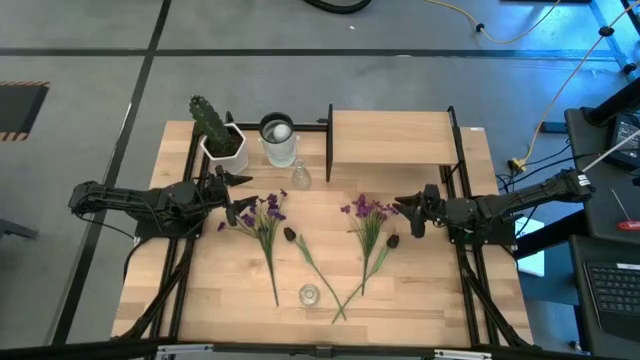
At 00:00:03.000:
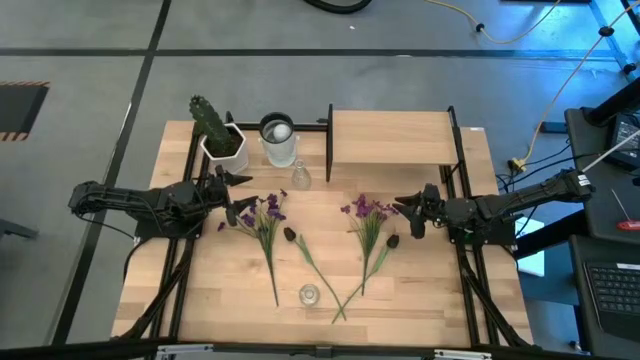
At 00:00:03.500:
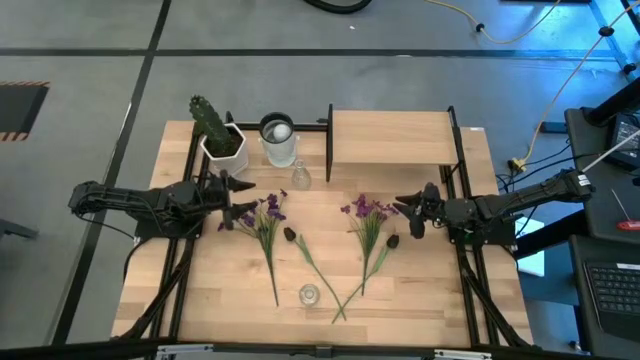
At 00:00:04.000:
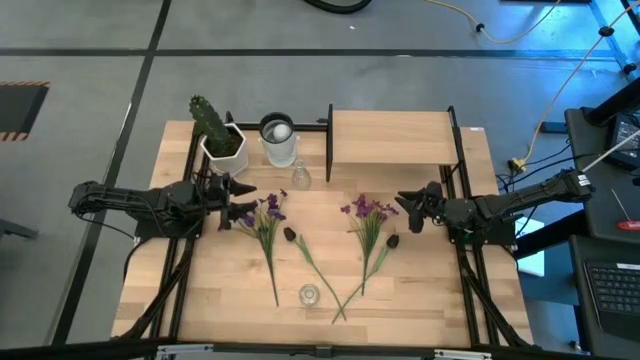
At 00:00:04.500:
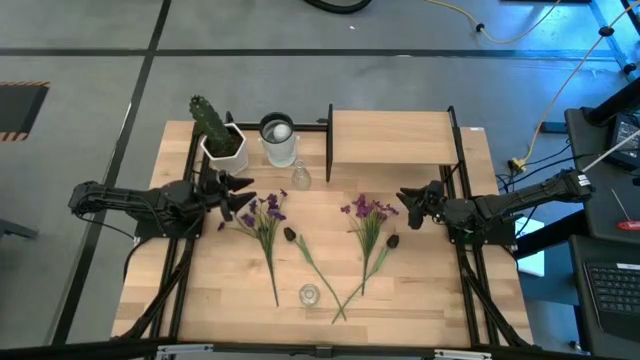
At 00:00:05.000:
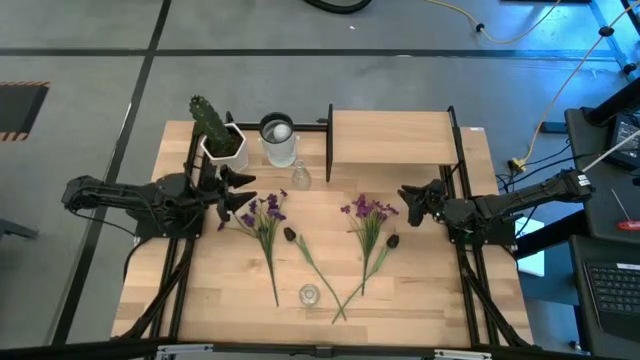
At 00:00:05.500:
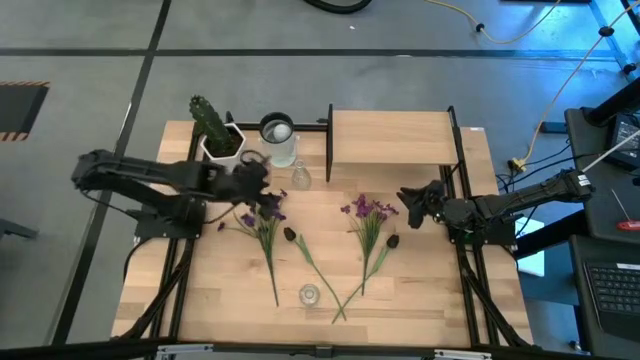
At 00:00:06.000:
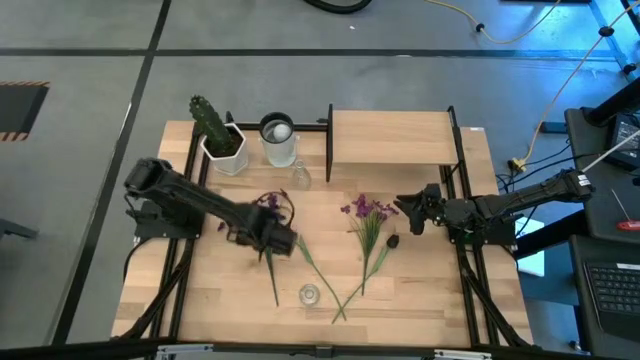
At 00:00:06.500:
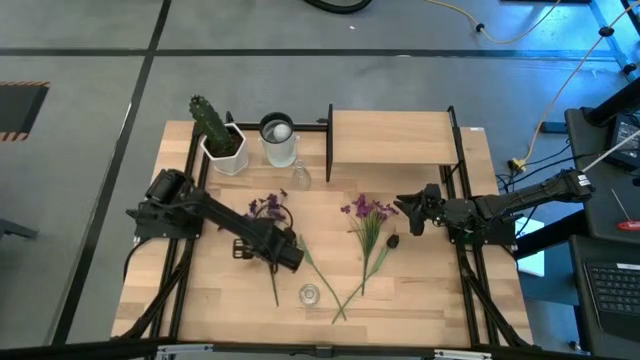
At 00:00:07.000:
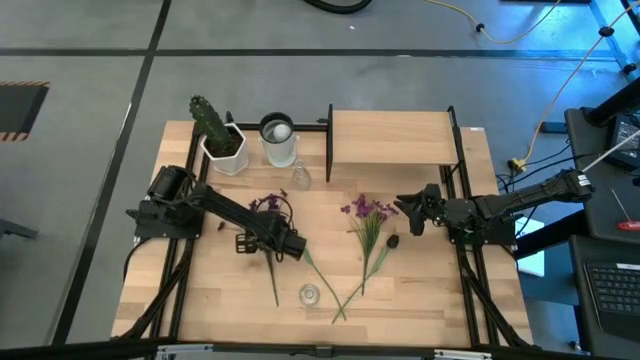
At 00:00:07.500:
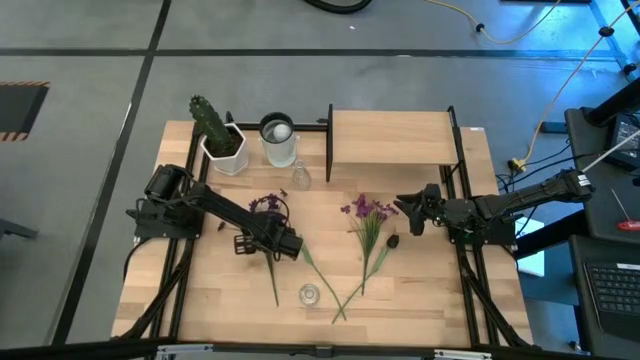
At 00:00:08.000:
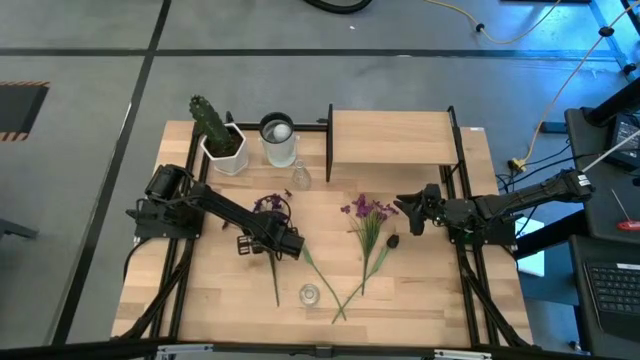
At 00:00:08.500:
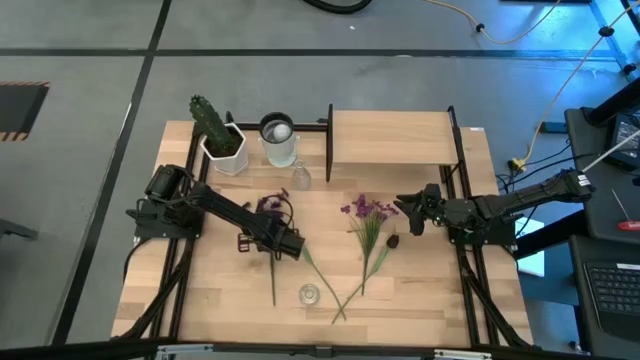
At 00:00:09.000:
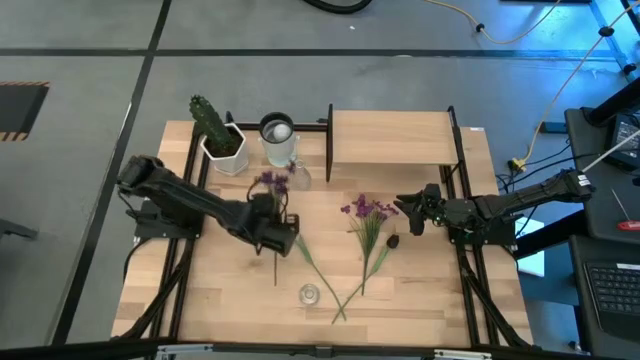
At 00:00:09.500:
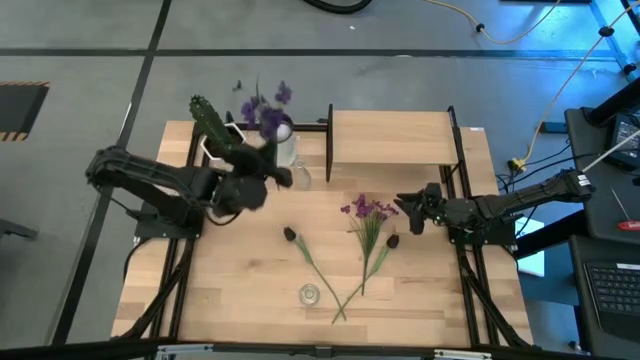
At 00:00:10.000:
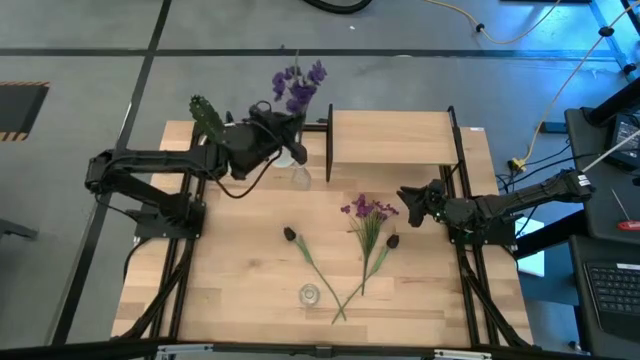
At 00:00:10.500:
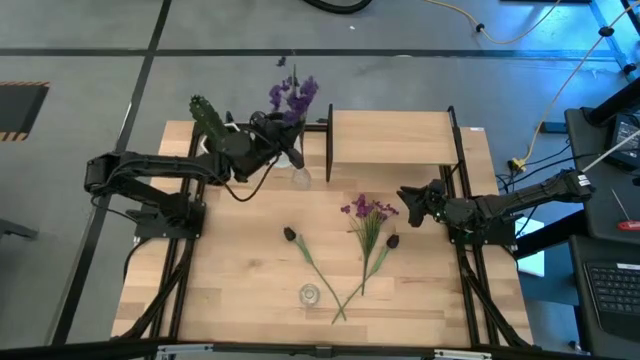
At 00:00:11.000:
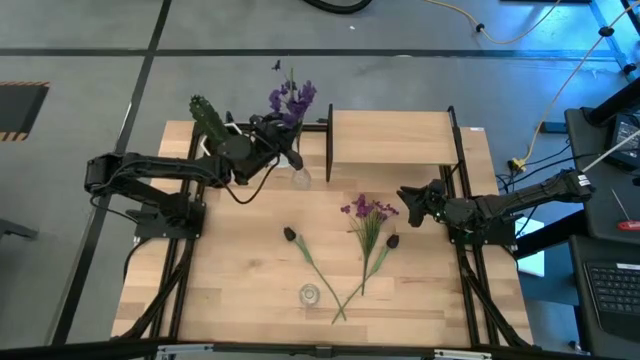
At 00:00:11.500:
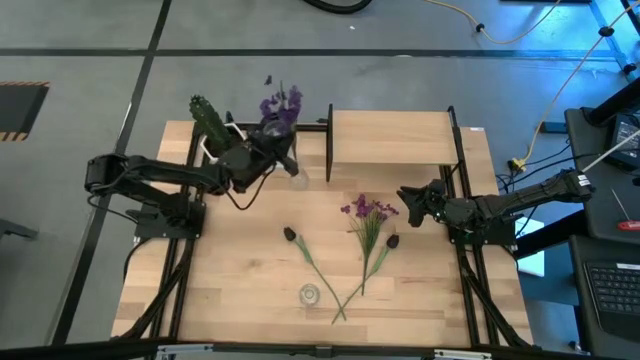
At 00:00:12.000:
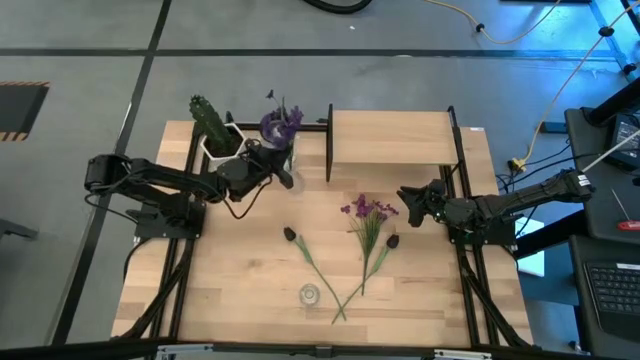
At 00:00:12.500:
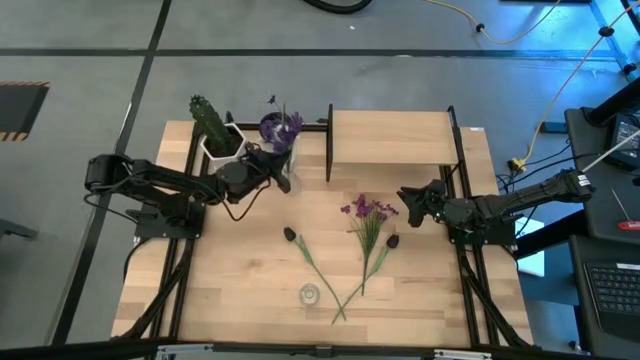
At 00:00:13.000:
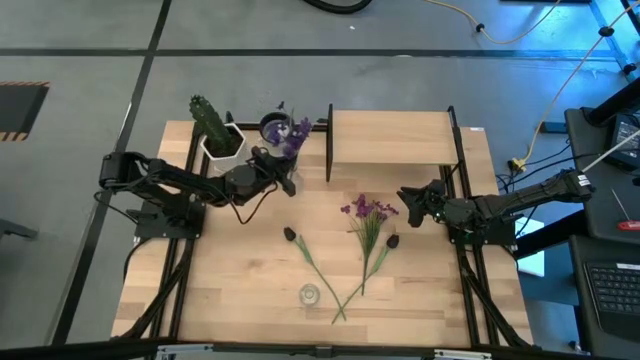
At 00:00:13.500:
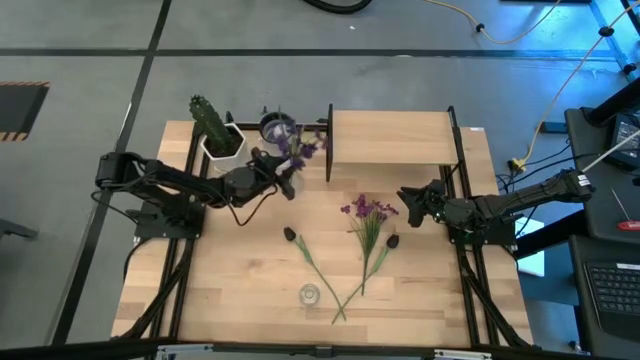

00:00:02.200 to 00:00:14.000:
Task: Pick and place flowers into a vace then onto a shelf
Put the dark purple flowers into the top transparent vase

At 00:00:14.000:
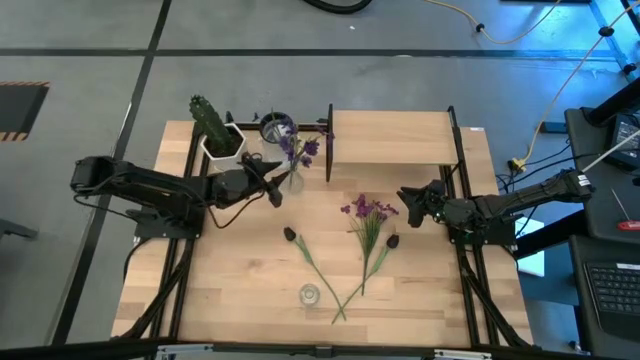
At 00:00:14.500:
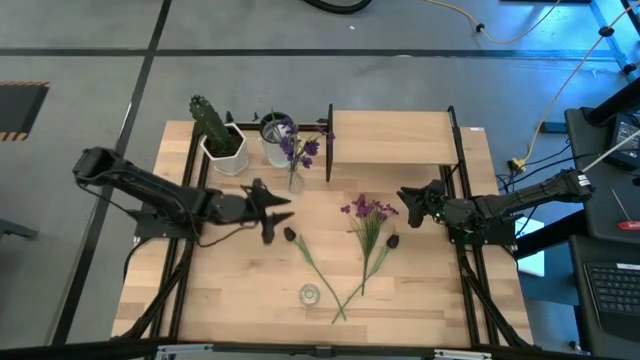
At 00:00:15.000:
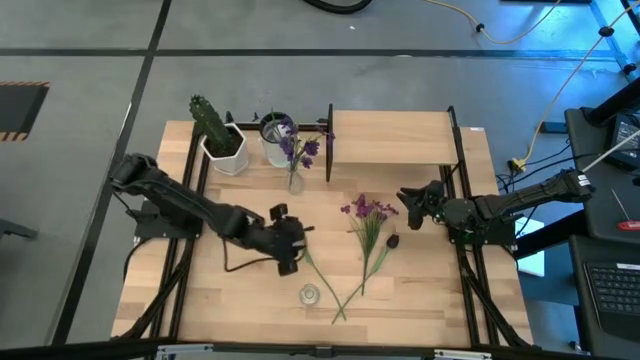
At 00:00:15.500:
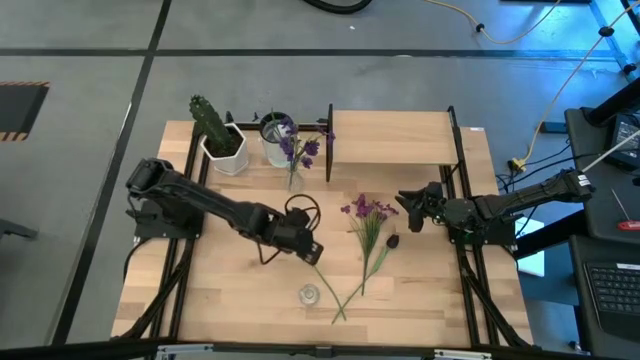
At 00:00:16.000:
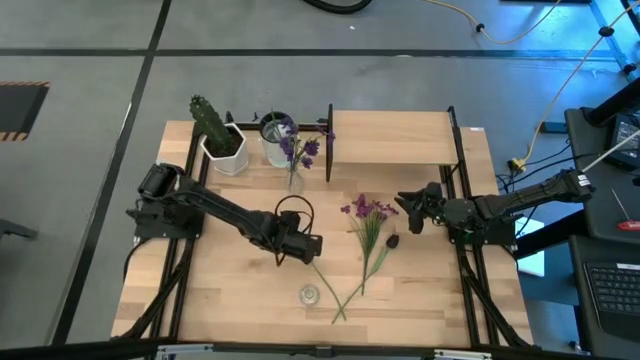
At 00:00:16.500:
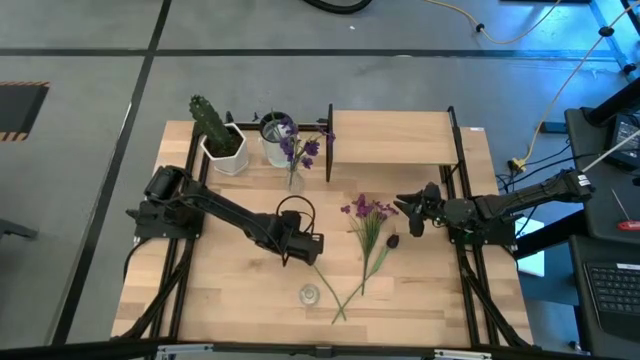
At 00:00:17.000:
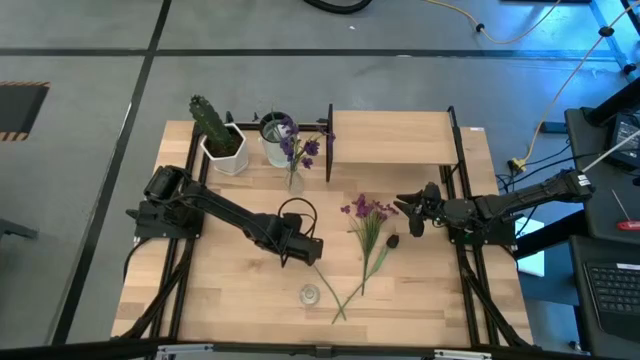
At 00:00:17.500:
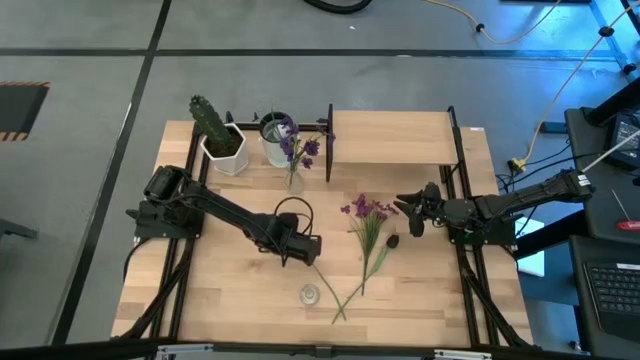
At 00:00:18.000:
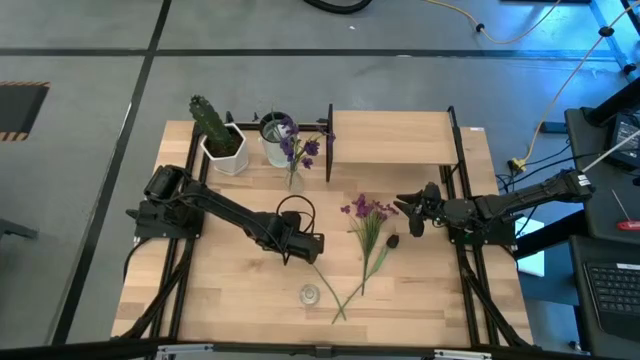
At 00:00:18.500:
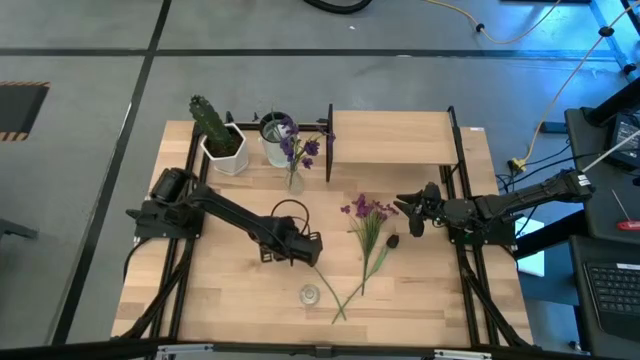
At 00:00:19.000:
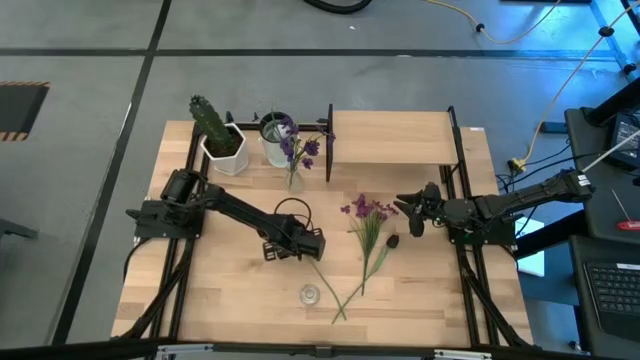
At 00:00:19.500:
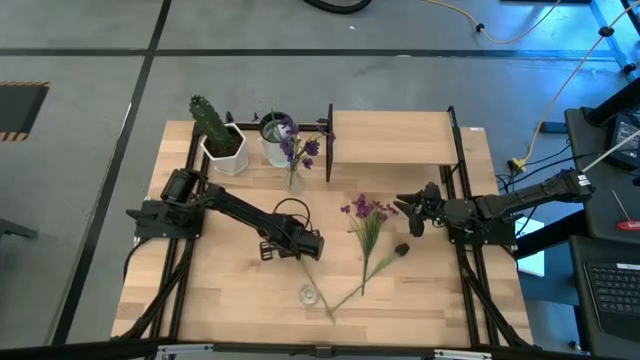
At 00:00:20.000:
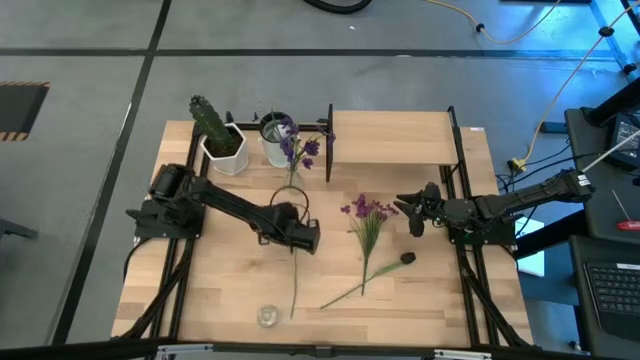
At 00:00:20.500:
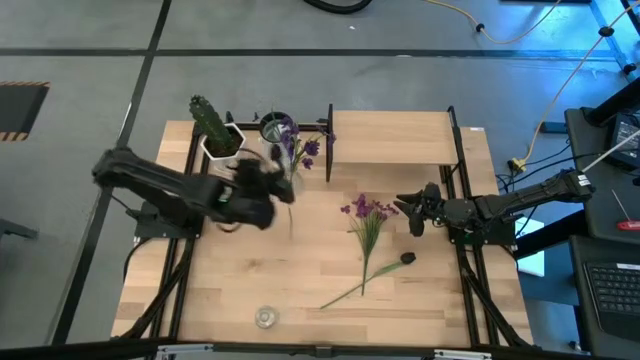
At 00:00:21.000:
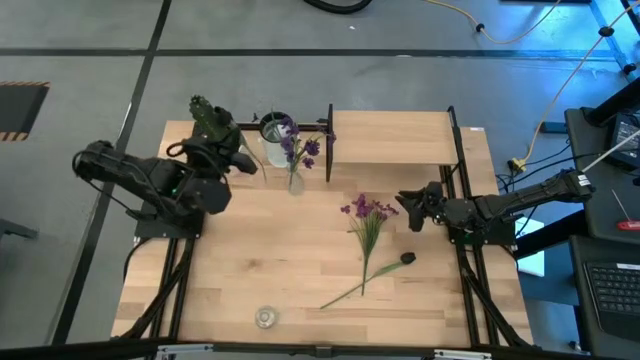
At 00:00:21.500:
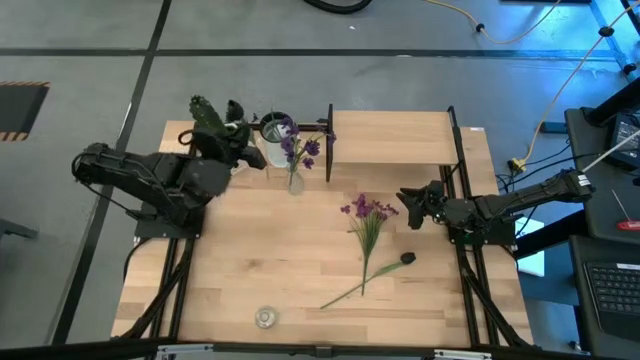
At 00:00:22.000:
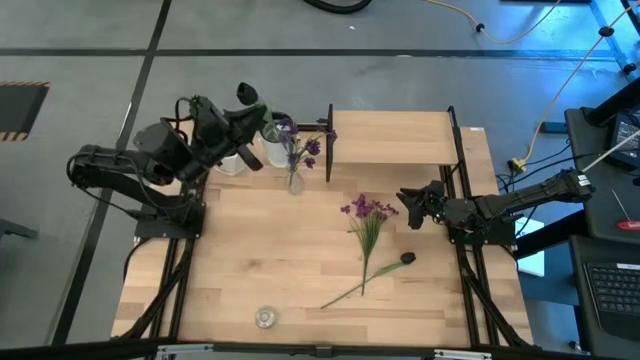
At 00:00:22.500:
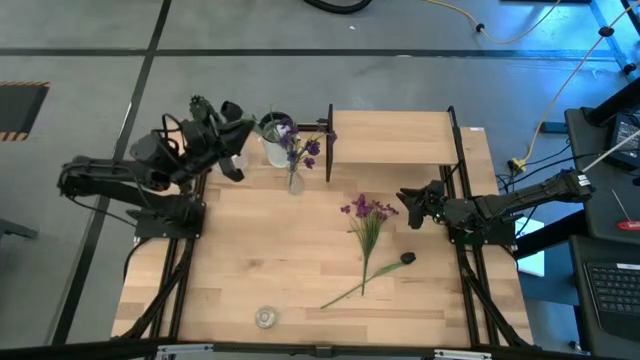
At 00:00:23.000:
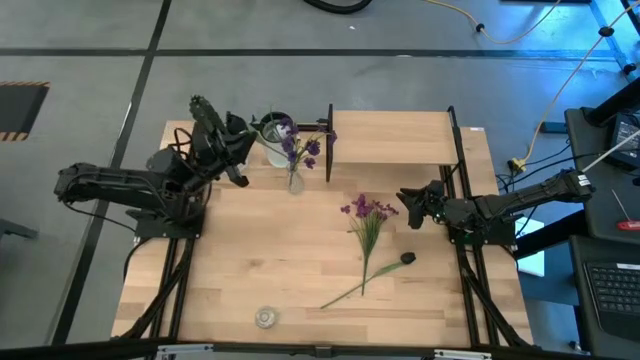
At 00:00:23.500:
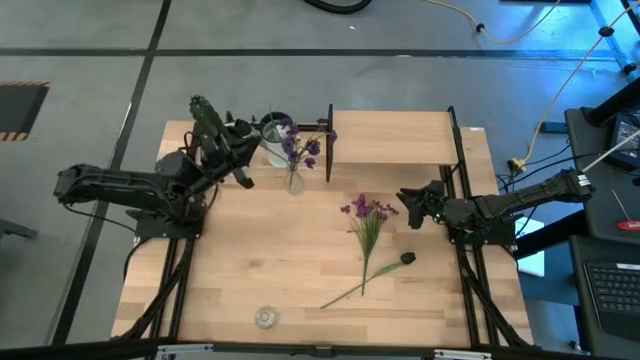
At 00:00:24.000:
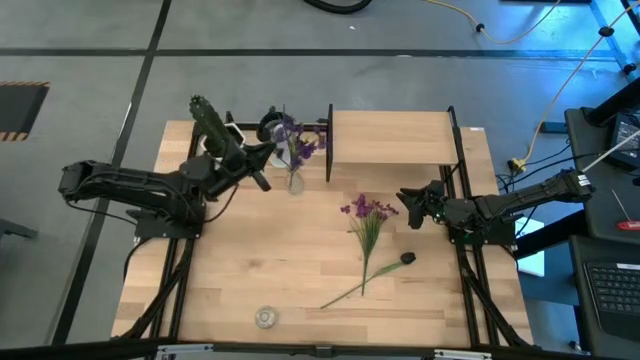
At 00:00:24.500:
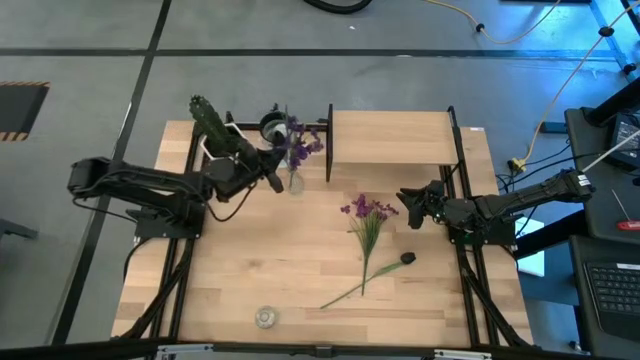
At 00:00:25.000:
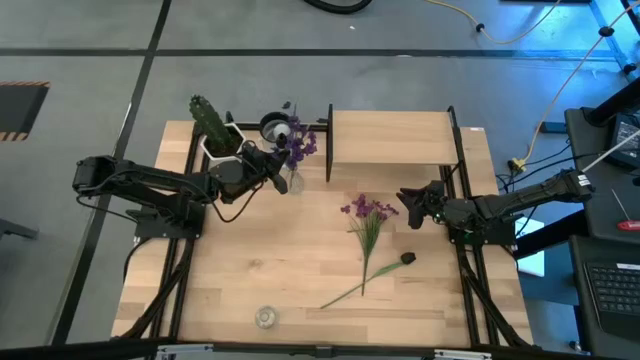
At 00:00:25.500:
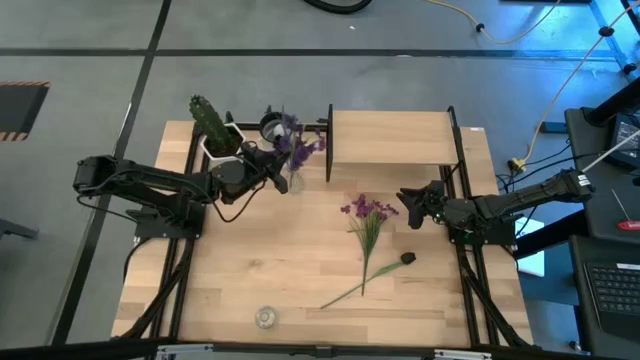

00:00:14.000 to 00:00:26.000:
Put the left black flower into the top transparent vase
